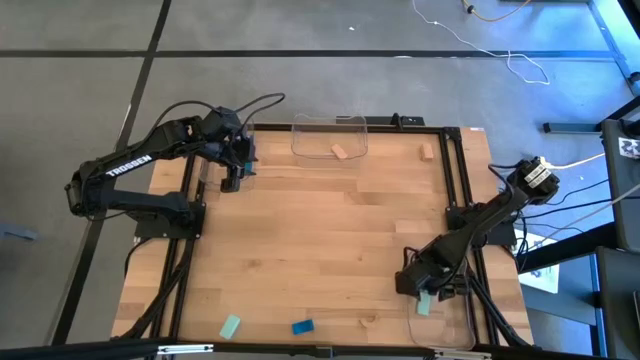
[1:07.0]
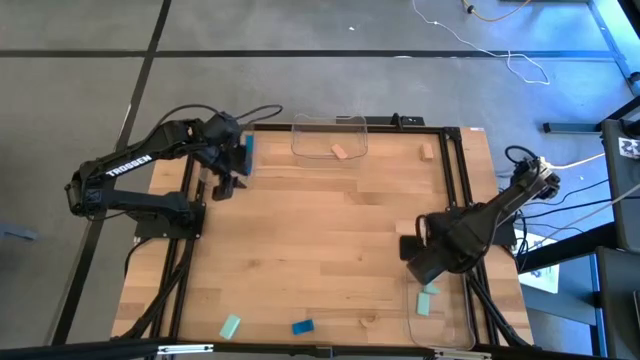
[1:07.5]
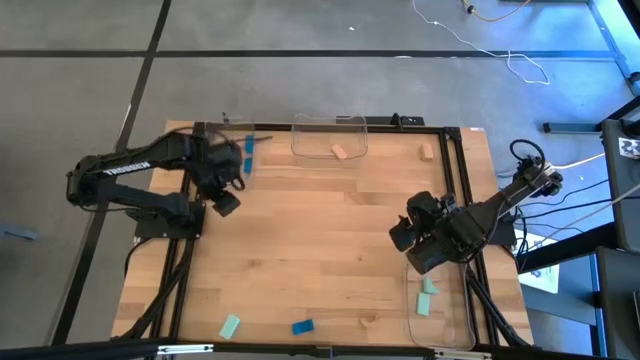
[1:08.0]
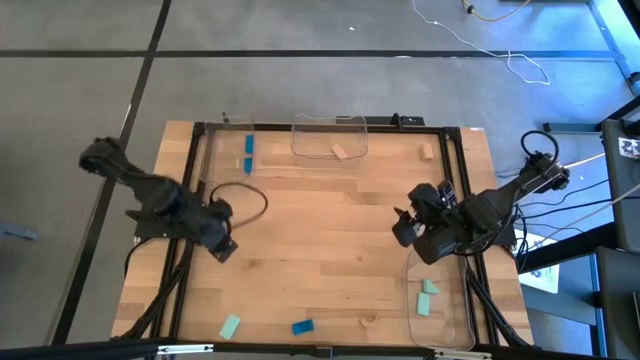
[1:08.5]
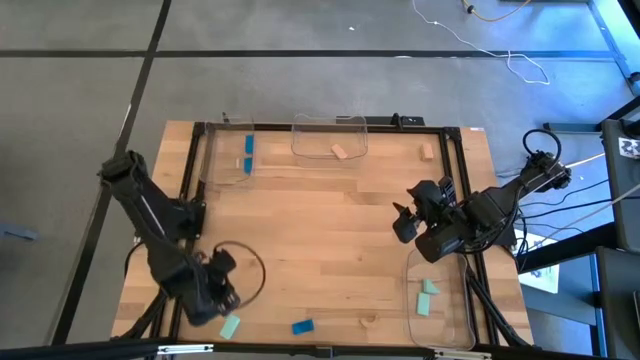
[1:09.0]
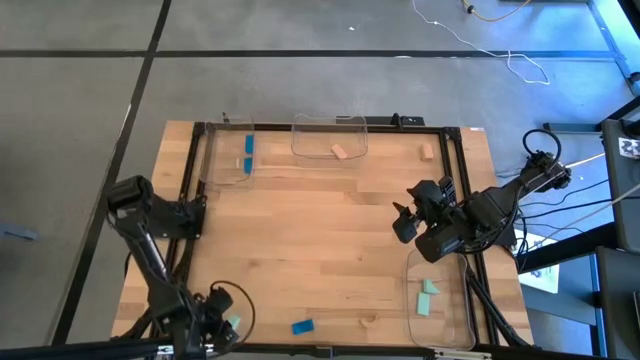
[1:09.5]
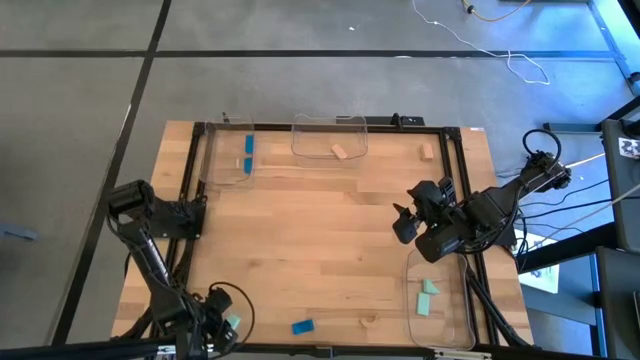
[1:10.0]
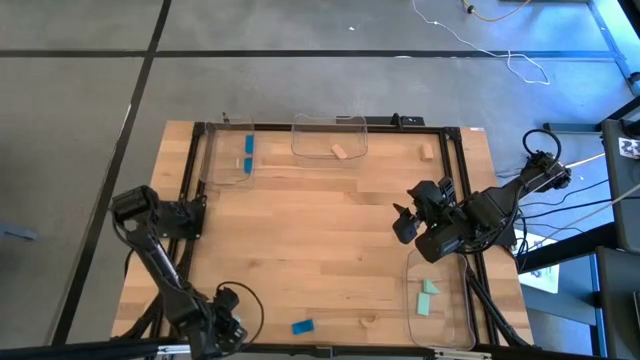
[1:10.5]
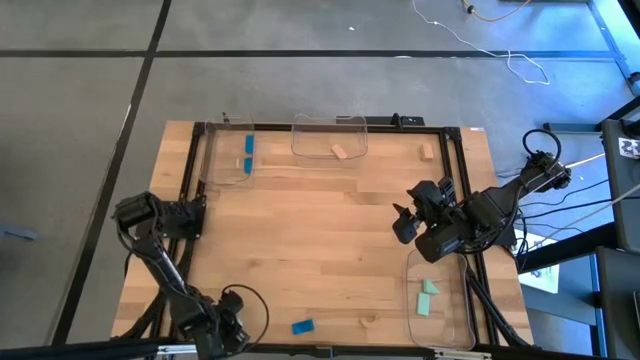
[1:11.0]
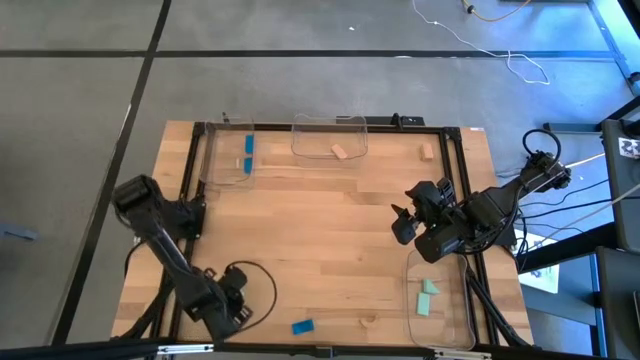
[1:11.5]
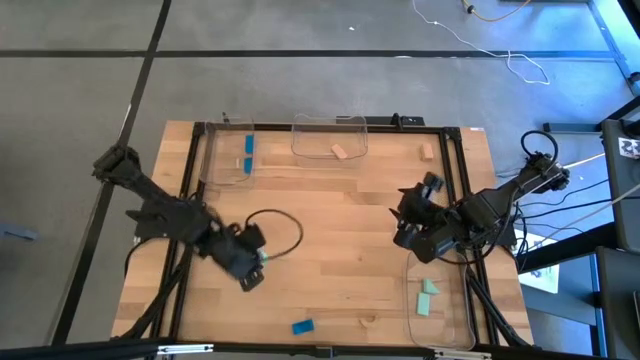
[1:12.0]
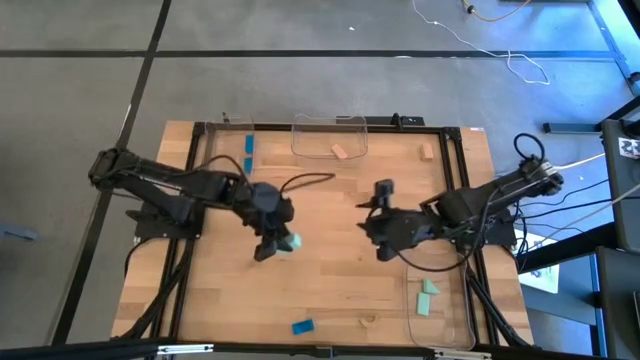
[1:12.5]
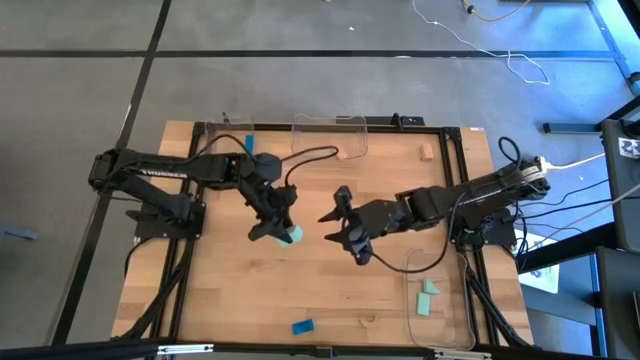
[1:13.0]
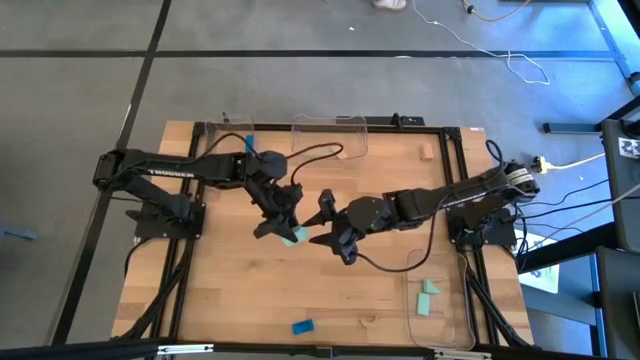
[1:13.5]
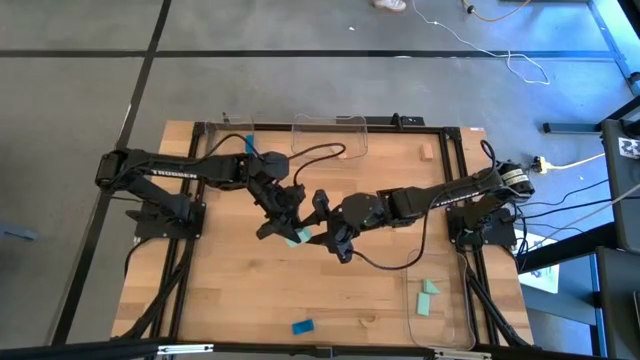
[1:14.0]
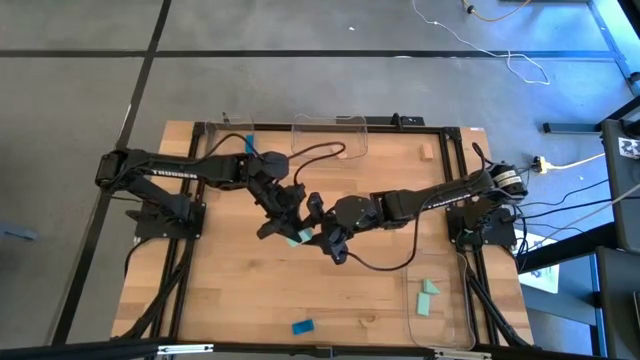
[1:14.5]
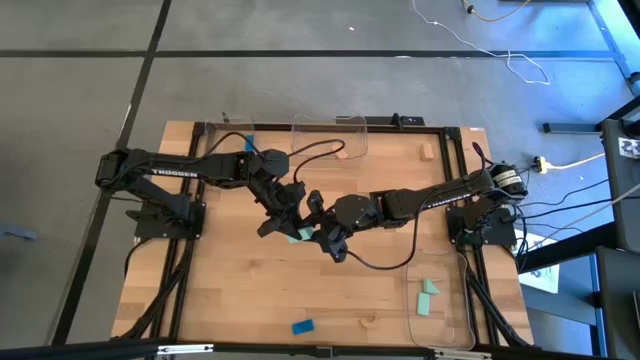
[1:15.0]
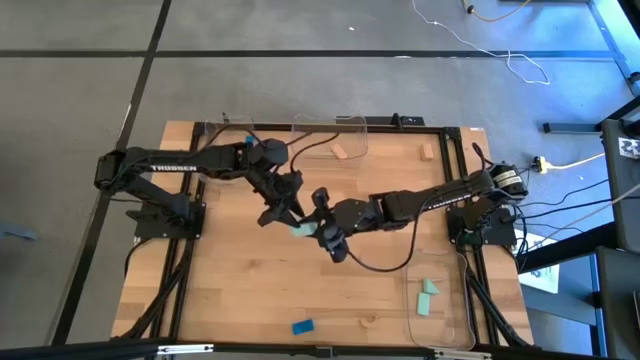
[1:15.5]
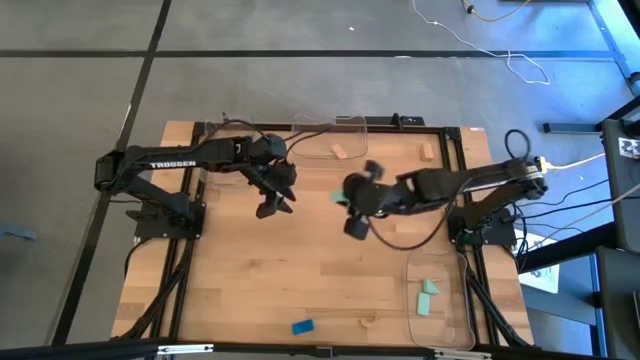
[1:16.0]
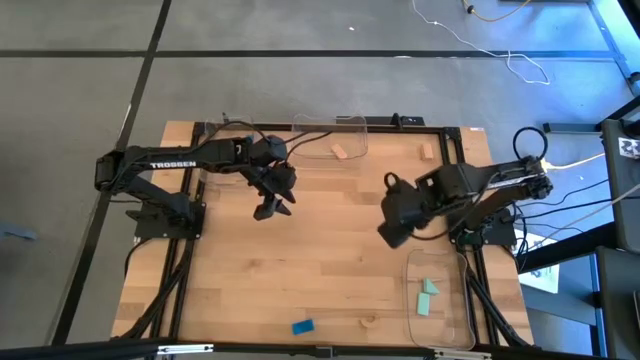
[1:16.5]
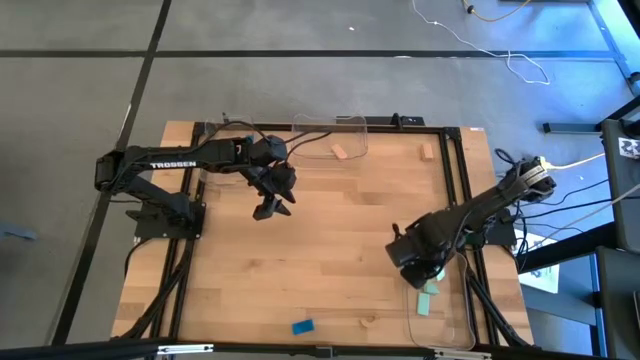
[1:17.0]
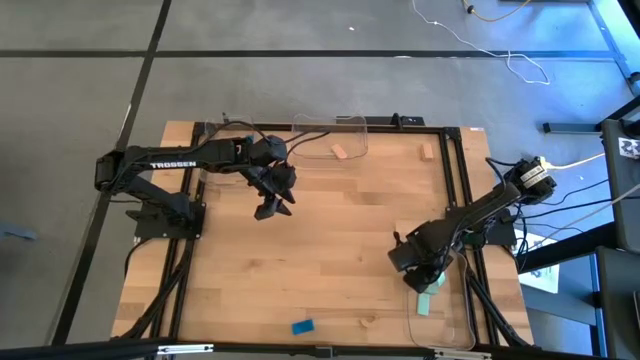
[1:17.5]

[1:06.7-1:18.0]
Task: Sort & place blocks by color
Put the light blue block into the bottom transparent bin

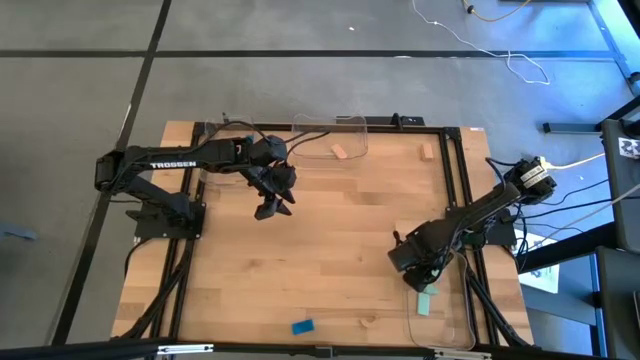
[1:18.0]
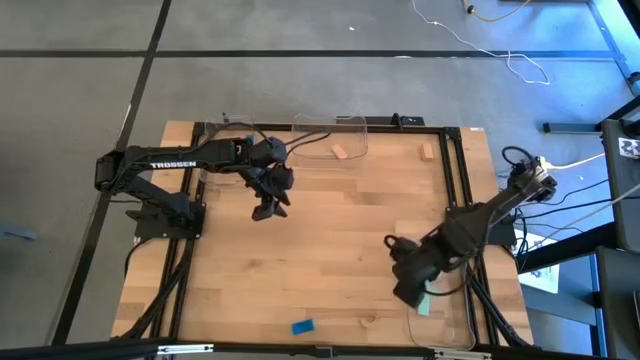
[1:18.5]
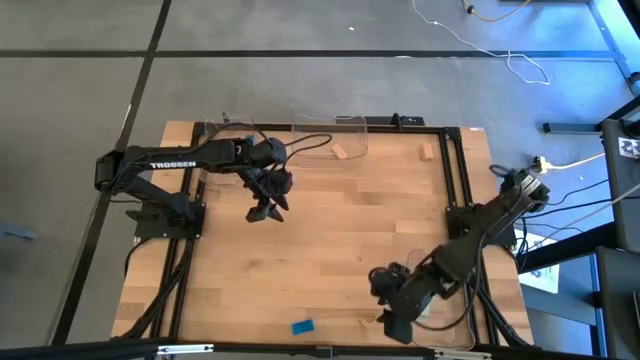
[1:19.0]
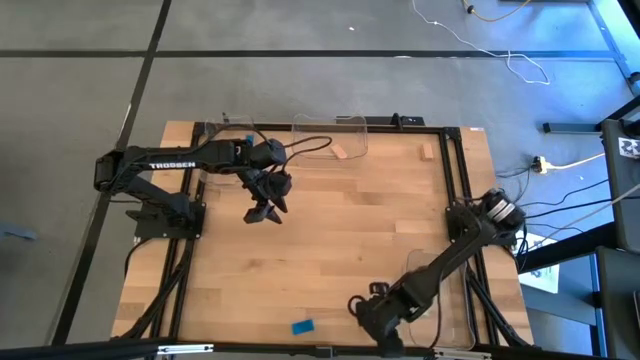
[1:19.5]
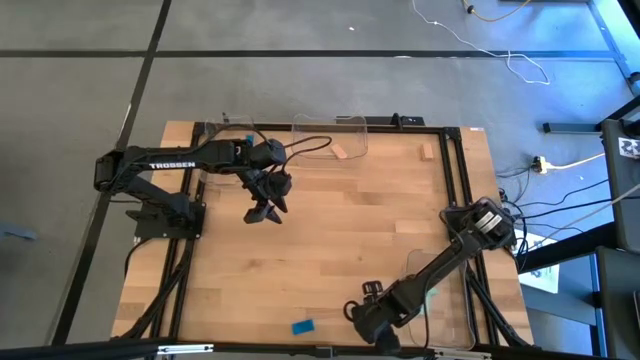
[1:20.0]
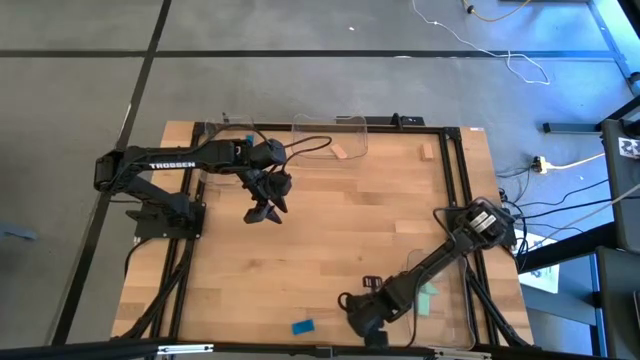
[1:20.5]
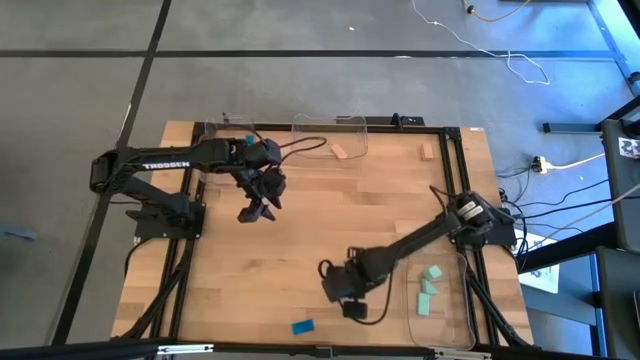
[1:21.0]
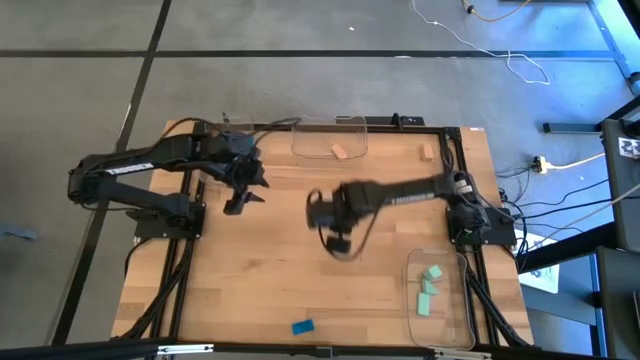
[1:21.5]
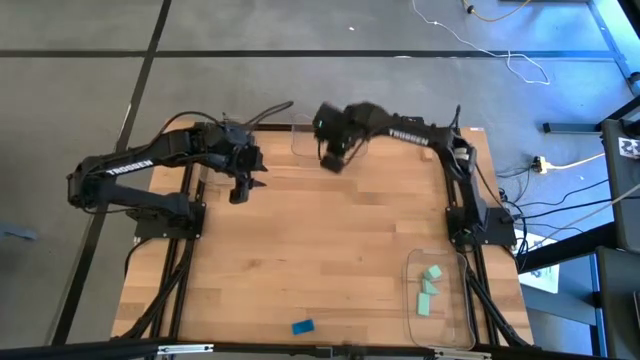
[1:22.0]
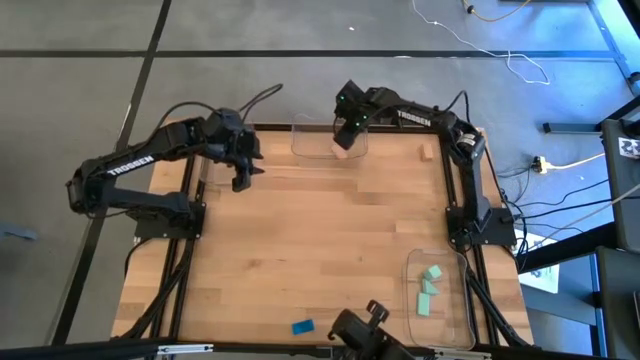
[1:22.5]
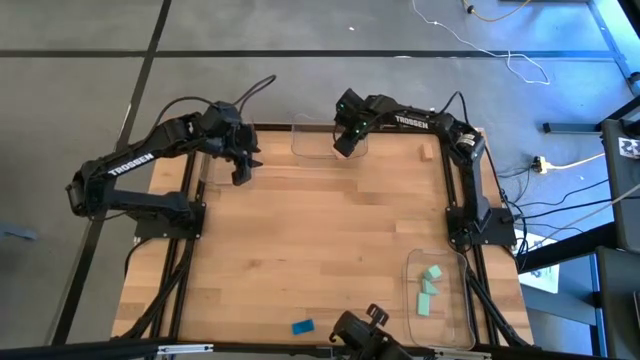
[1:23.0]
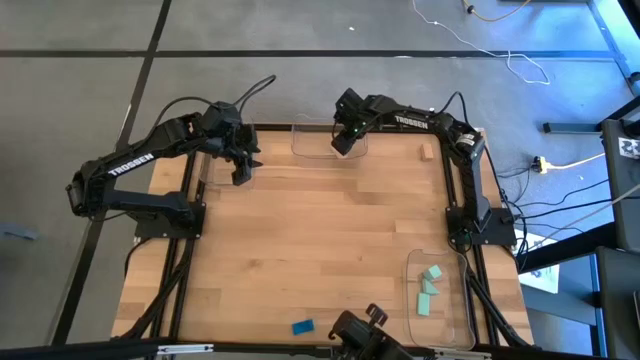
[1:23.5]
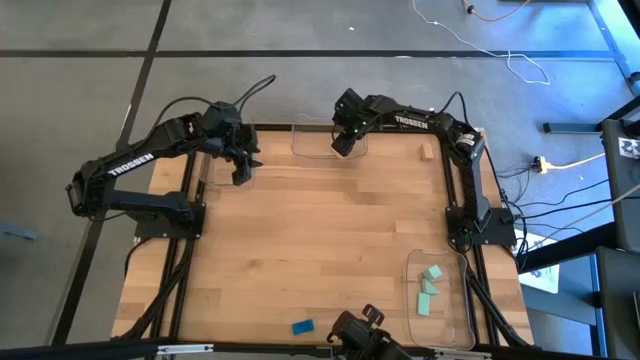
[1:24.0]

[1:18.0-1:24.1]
Put the bottom brown block into the top middle transparent bin

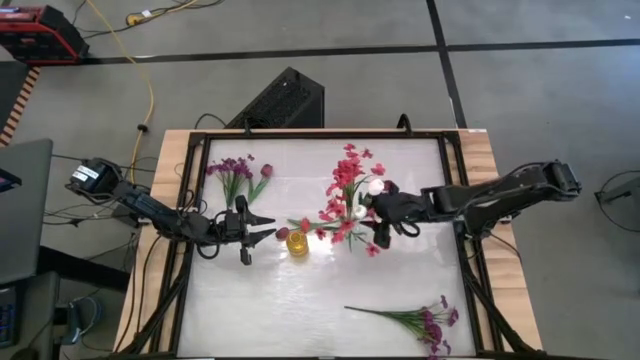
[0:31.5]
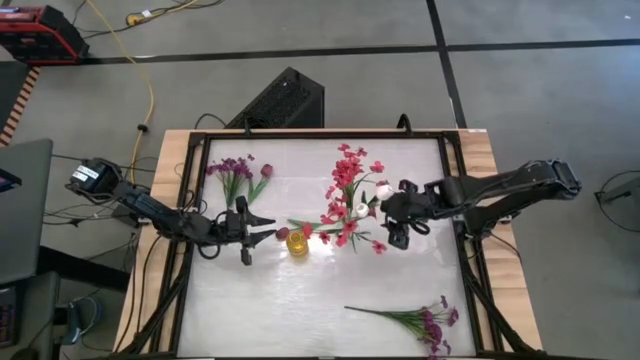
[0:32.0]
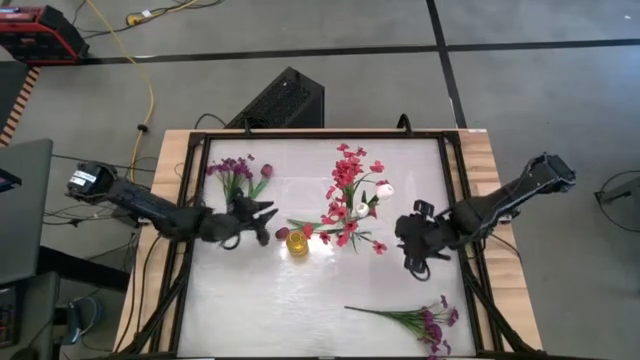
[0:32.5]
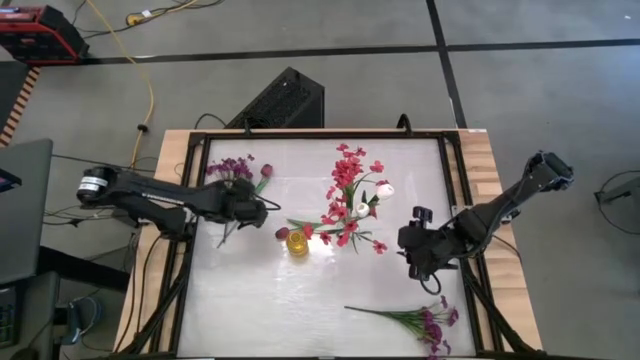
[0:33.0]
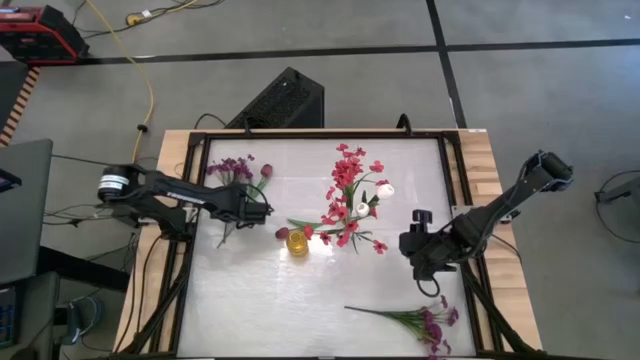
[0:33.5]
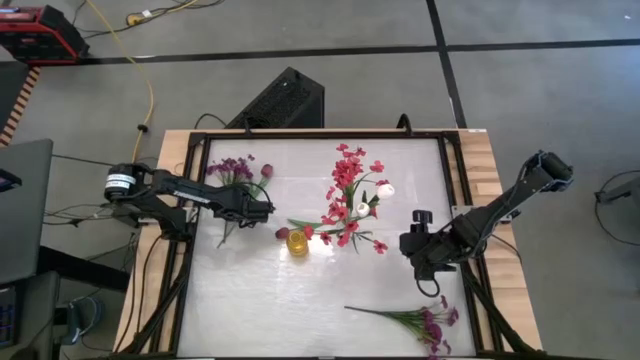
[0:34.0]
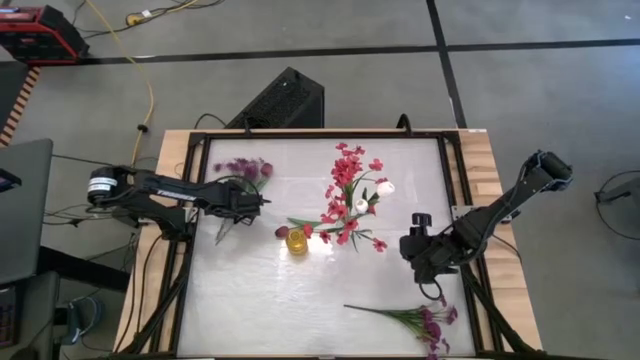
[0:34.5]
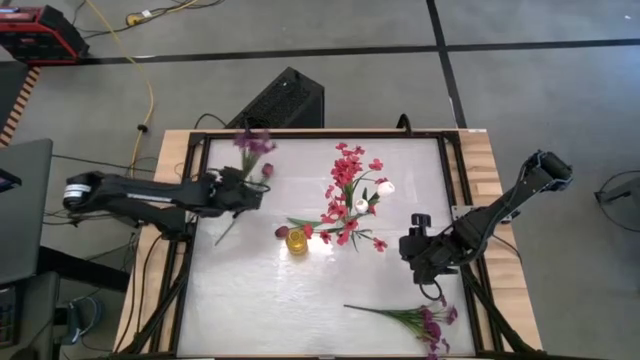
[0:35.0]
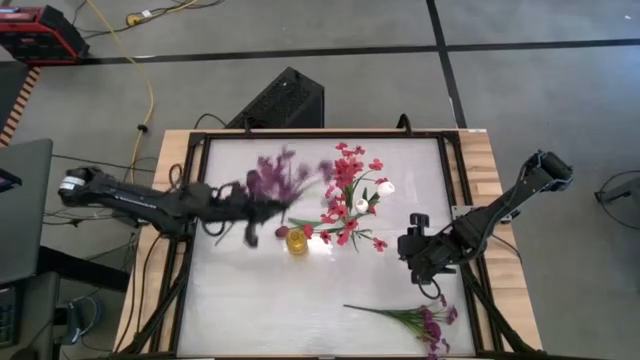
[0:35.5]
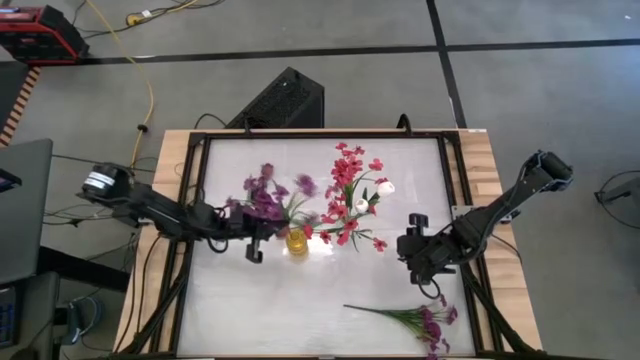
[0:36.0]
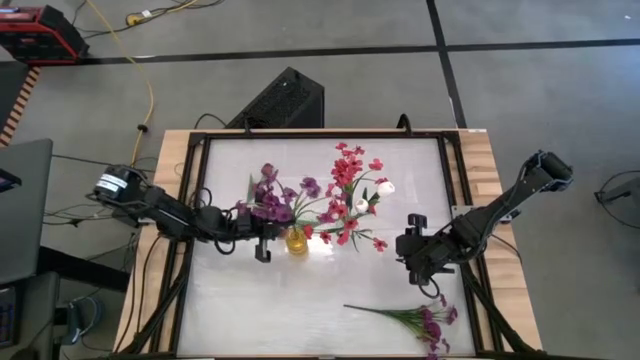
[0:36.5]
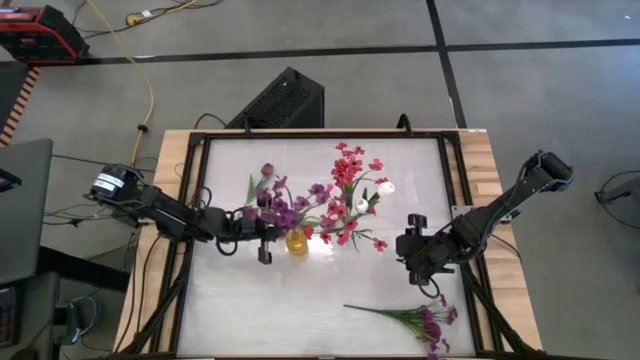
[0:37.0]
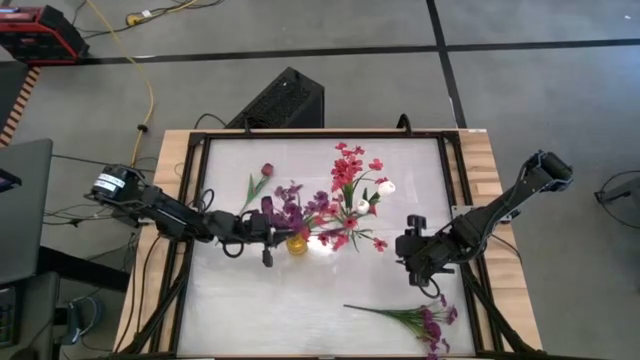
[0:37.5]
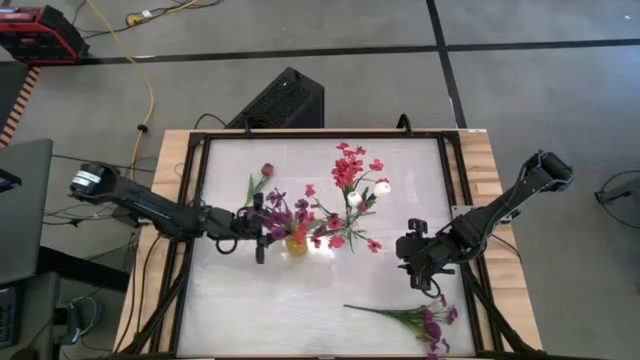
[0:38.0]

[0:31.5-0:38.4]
Task: Sort flowers into vase by color
Put the top violet flowers into the yellow vase
